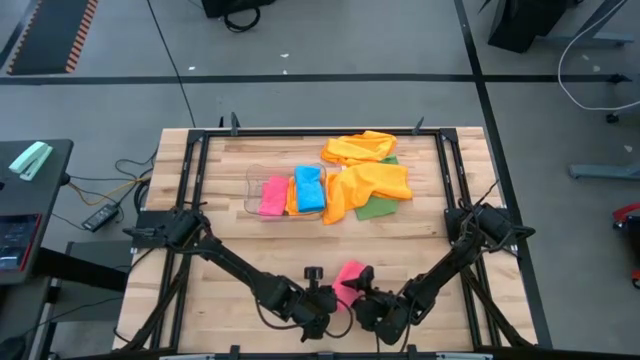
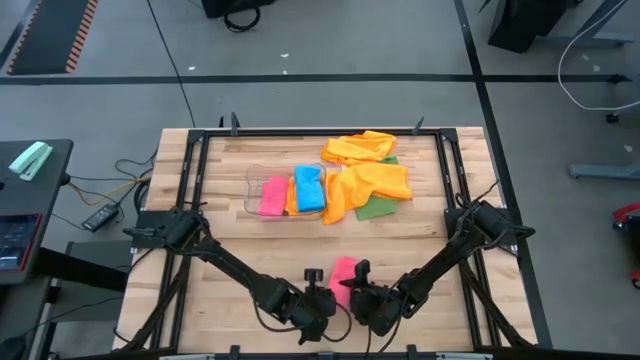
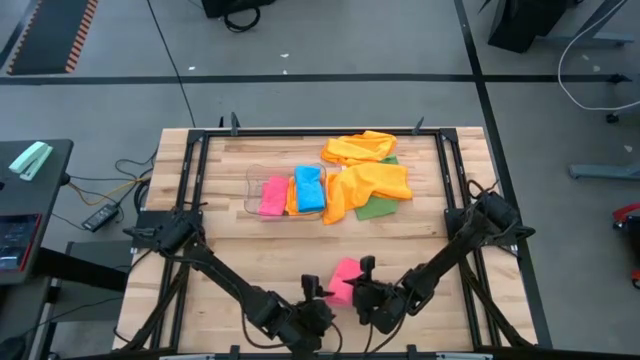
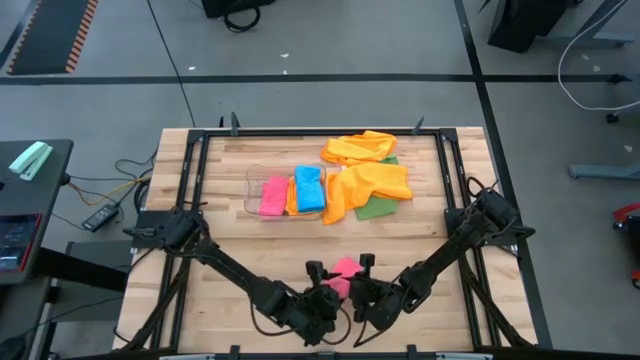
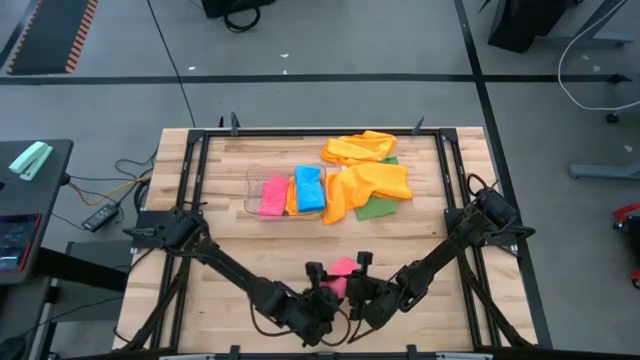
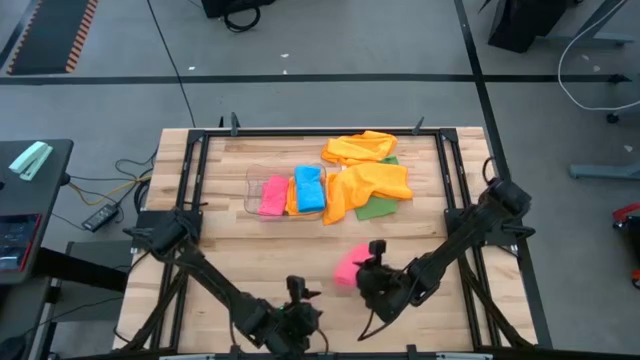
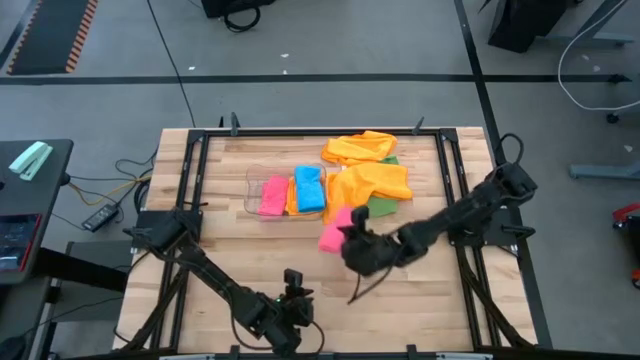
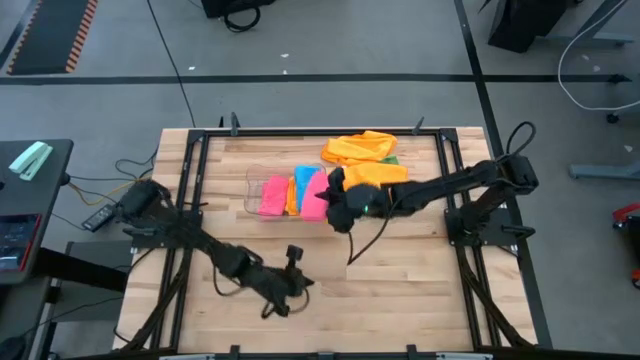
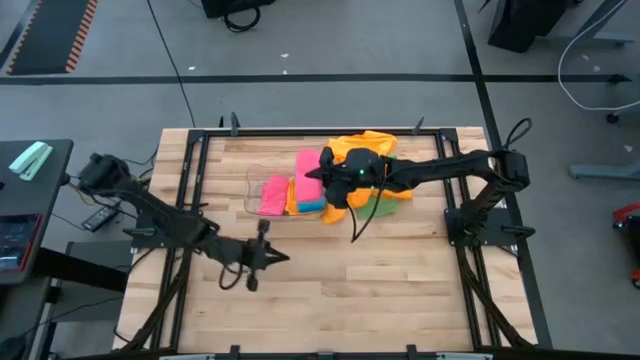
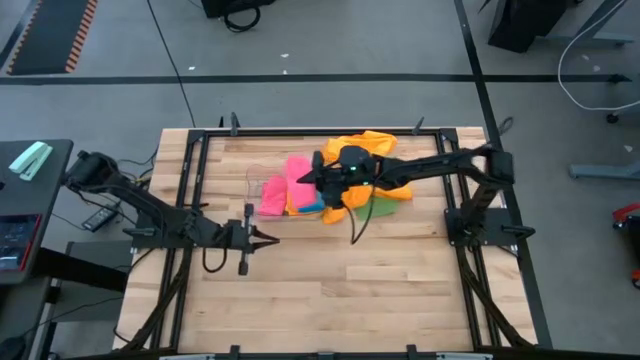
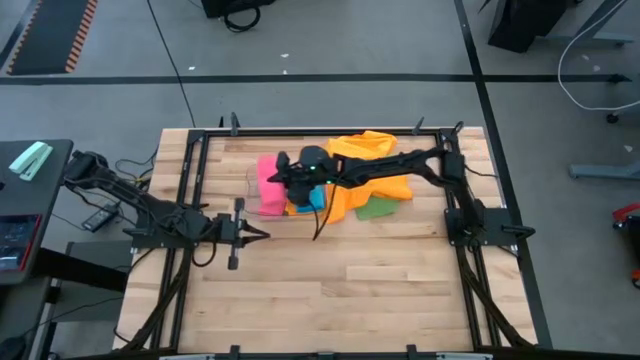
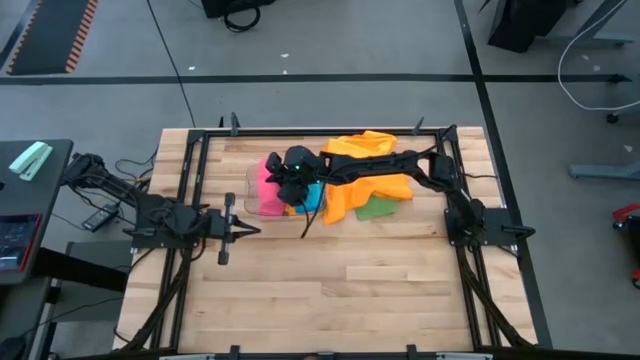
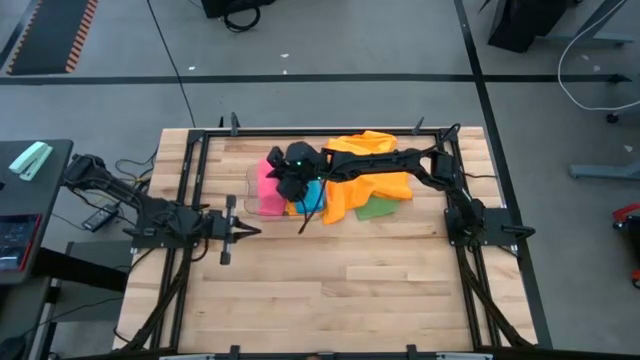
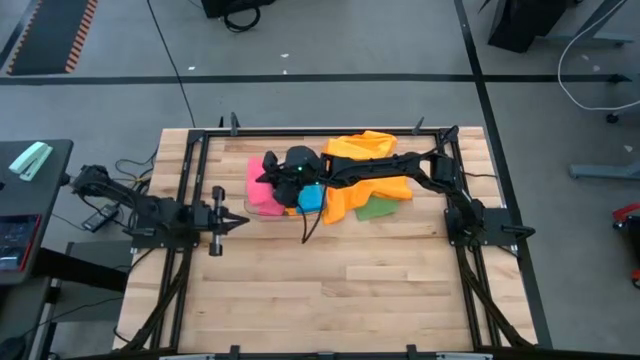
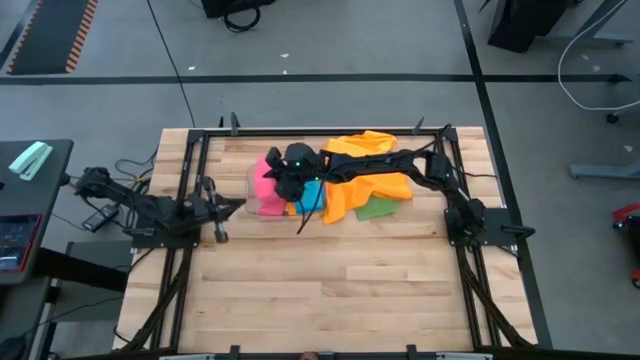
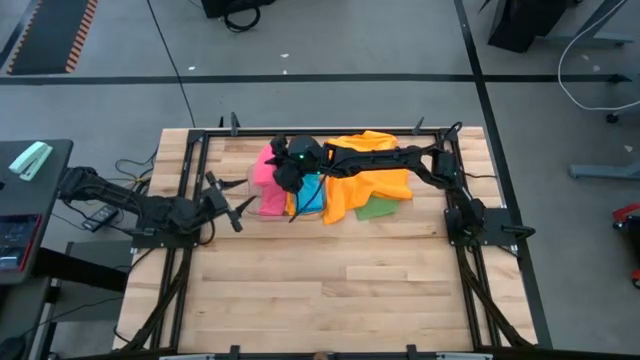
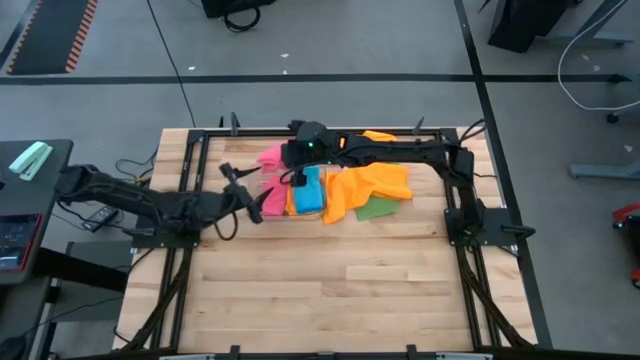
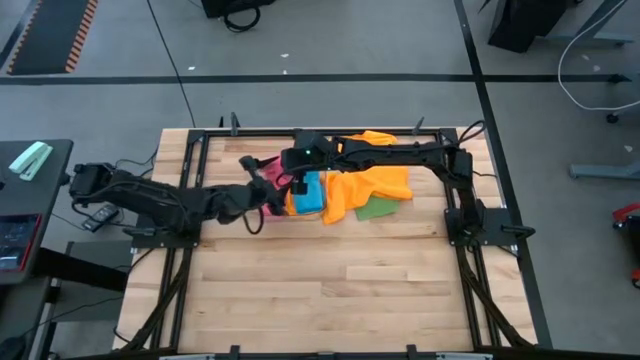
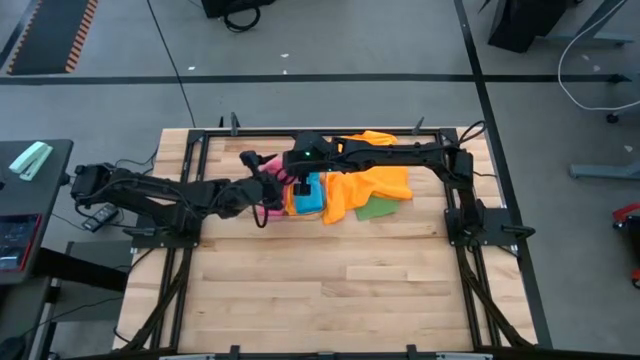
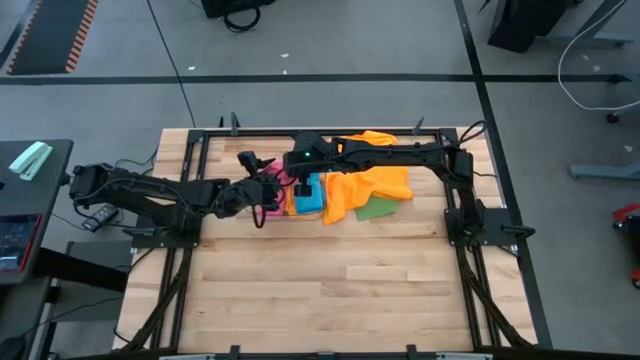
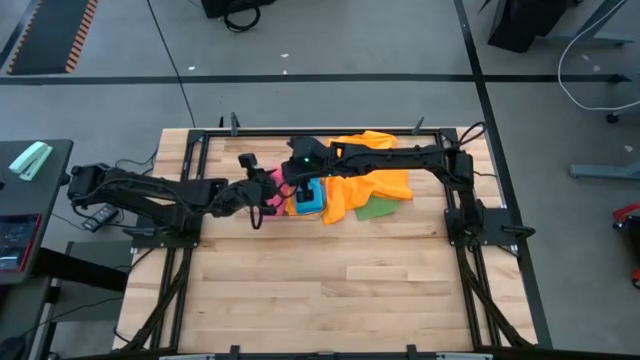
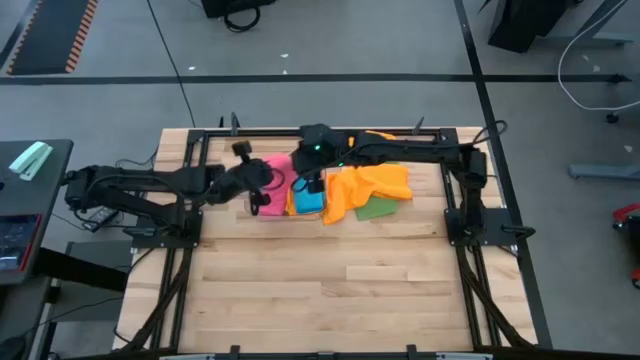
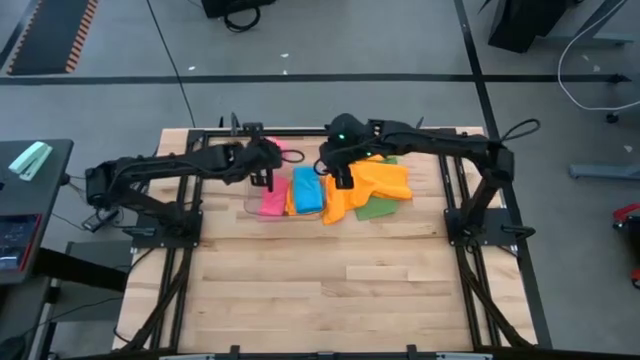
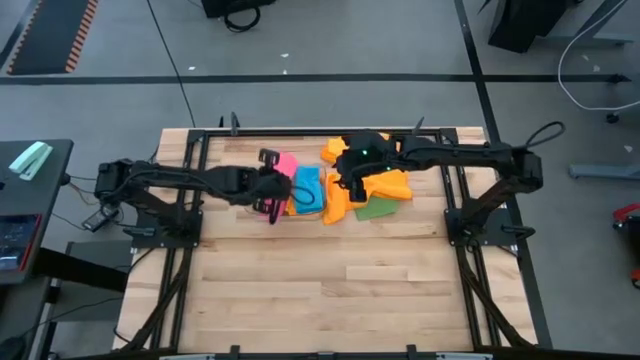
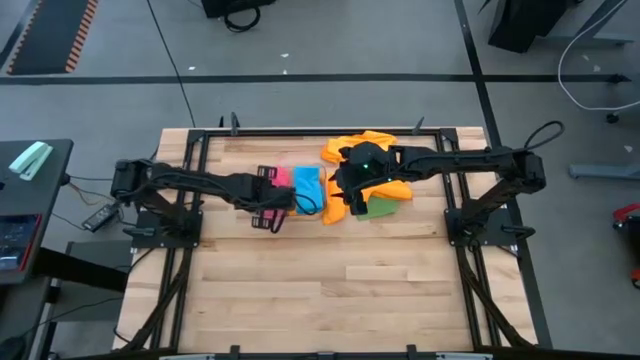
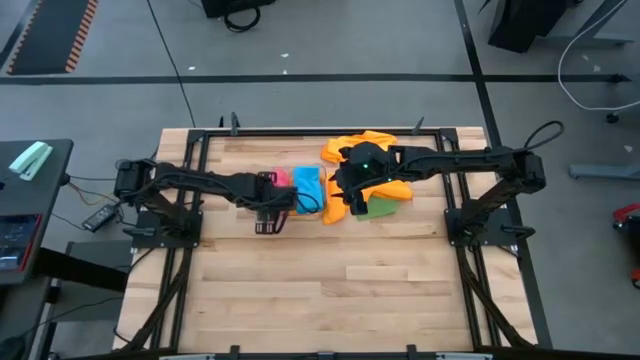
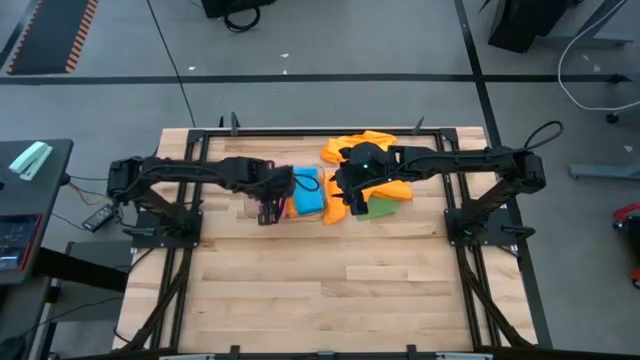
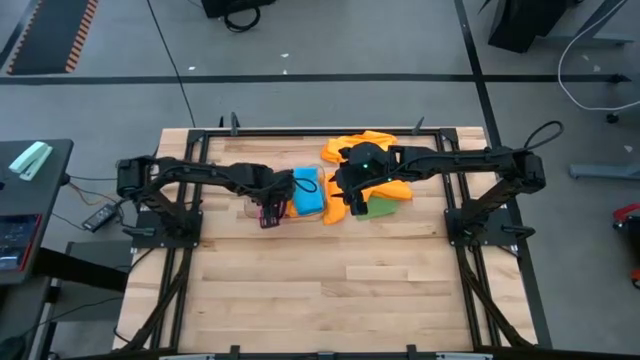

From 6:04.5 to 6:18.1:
Task: Fold microfiber towels
Put the folded pink microfiber cloth into the transparent bin
